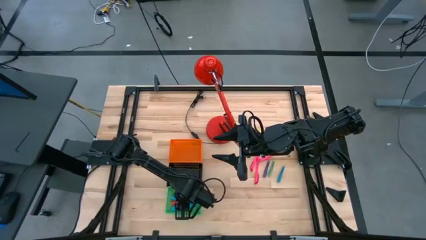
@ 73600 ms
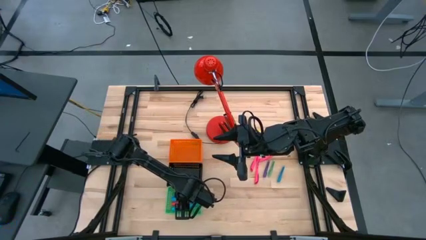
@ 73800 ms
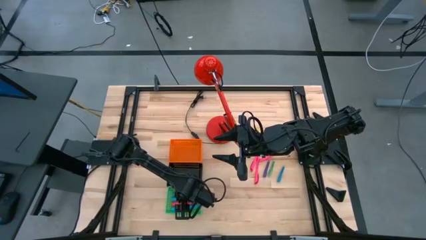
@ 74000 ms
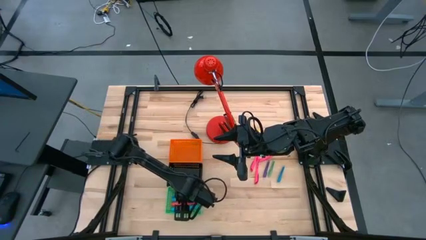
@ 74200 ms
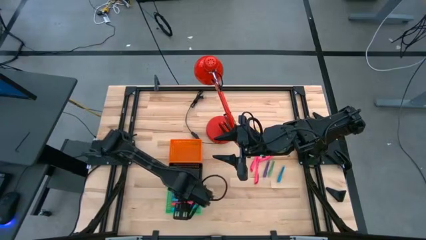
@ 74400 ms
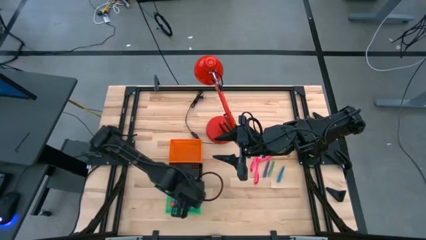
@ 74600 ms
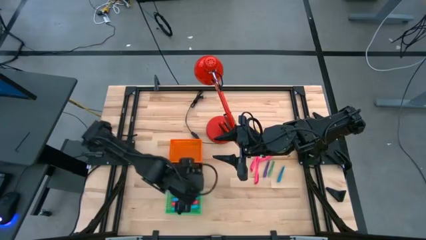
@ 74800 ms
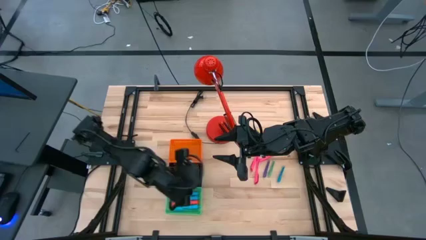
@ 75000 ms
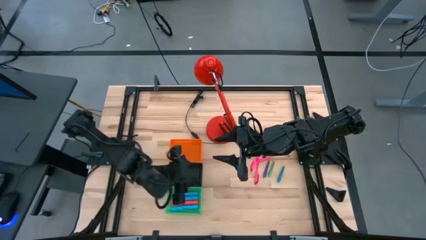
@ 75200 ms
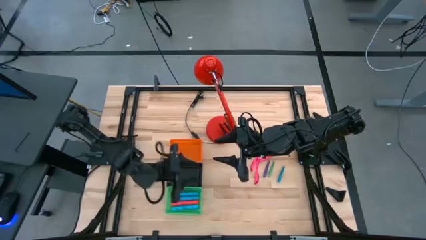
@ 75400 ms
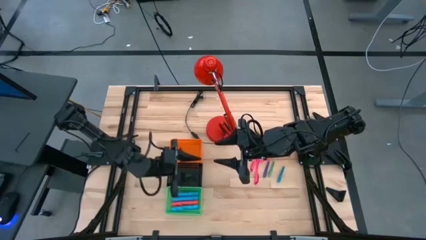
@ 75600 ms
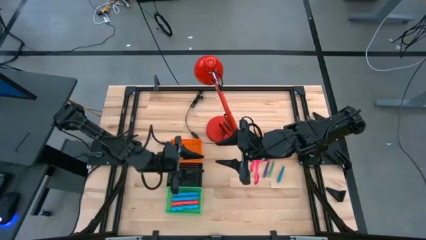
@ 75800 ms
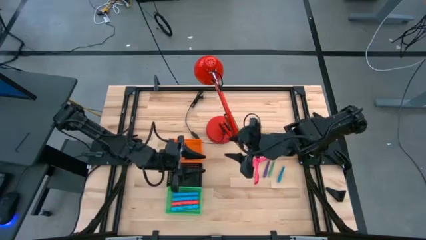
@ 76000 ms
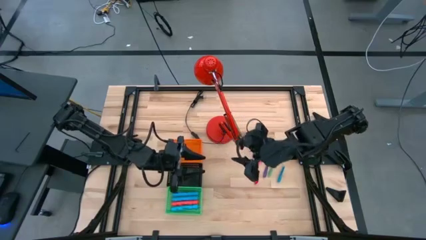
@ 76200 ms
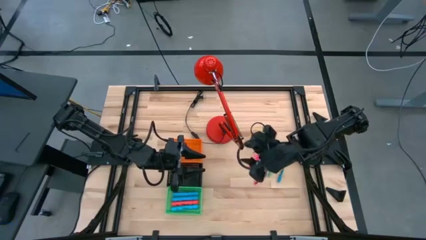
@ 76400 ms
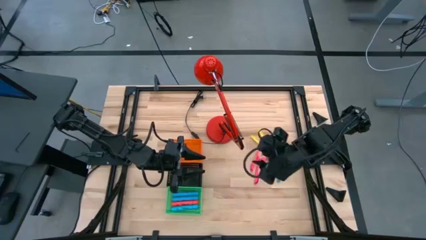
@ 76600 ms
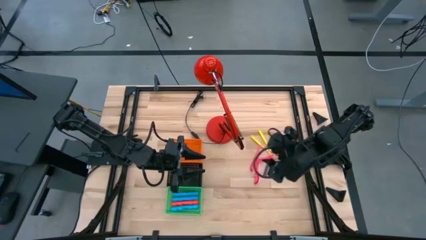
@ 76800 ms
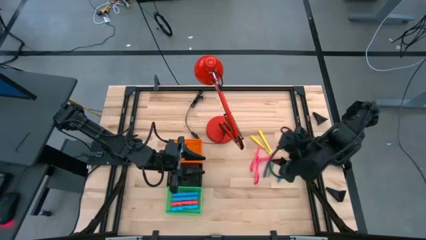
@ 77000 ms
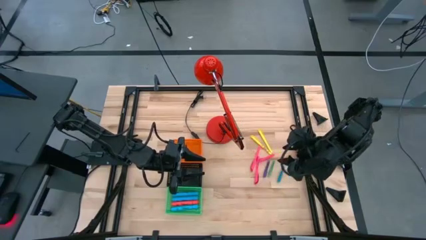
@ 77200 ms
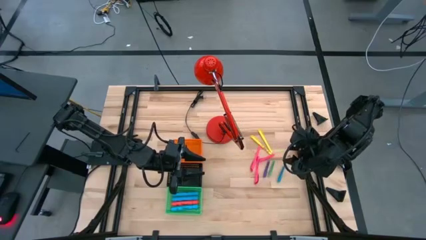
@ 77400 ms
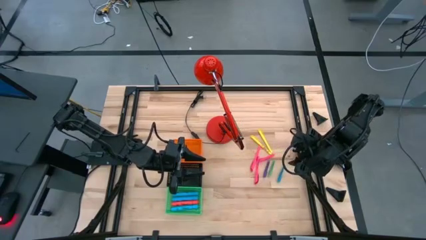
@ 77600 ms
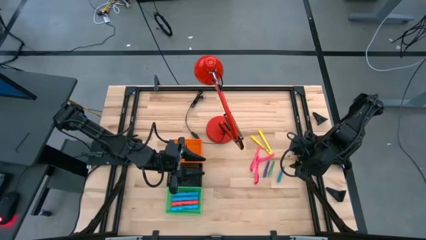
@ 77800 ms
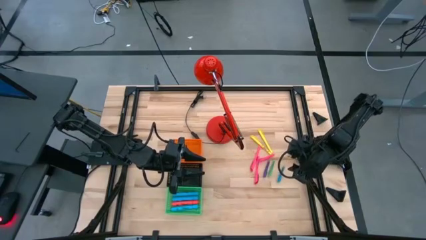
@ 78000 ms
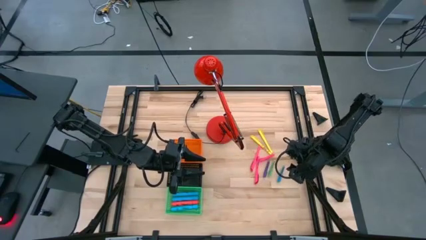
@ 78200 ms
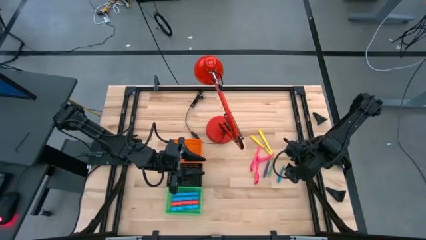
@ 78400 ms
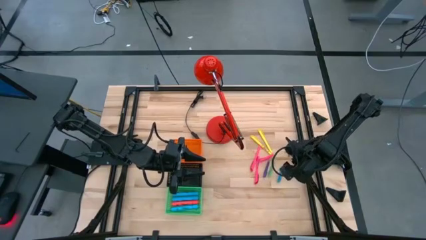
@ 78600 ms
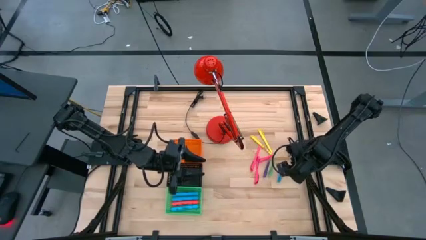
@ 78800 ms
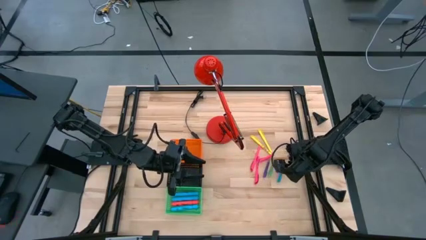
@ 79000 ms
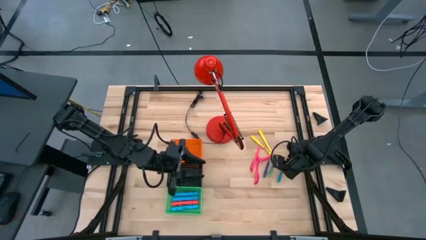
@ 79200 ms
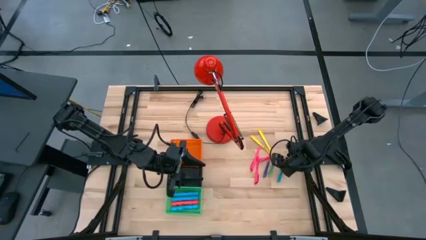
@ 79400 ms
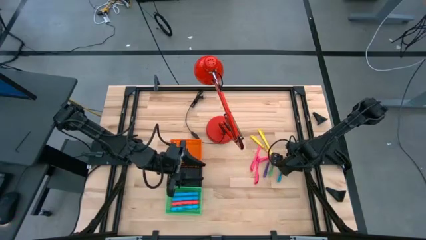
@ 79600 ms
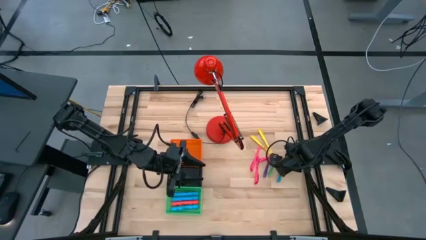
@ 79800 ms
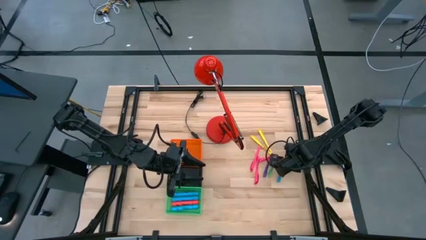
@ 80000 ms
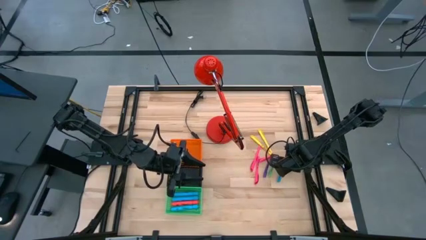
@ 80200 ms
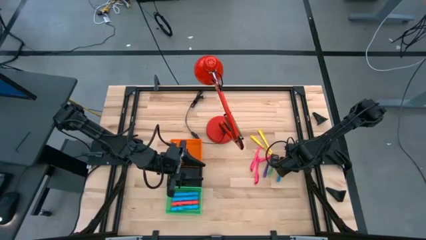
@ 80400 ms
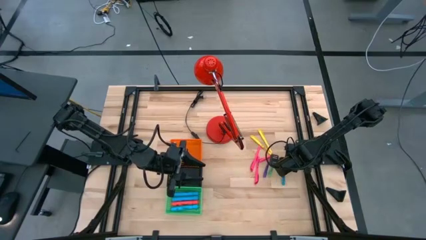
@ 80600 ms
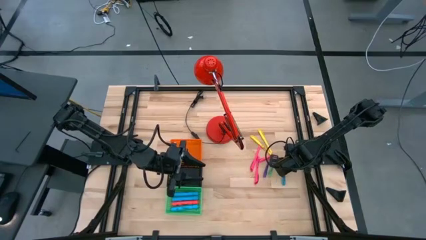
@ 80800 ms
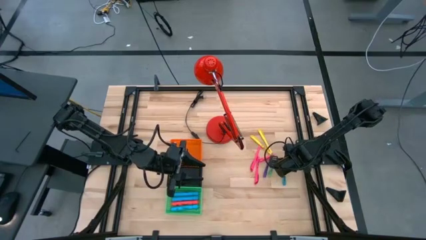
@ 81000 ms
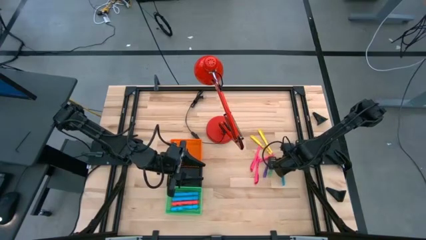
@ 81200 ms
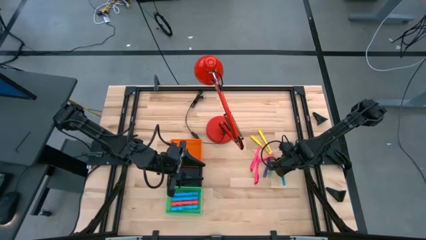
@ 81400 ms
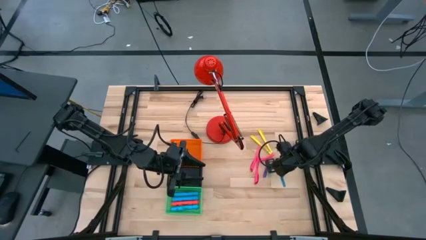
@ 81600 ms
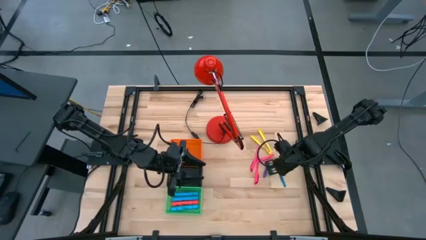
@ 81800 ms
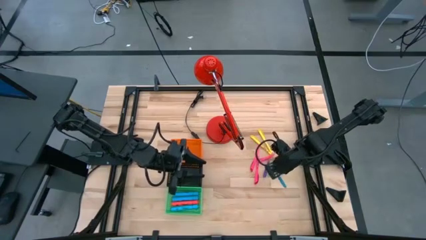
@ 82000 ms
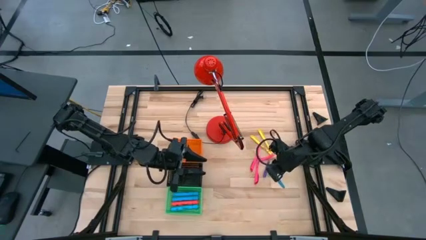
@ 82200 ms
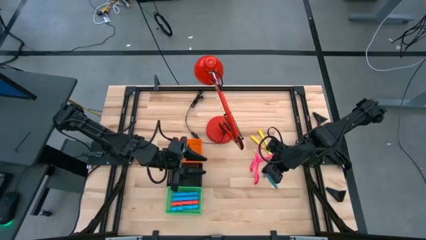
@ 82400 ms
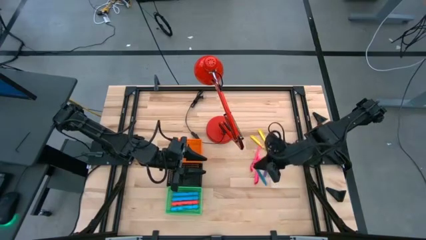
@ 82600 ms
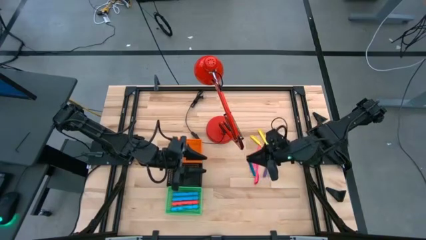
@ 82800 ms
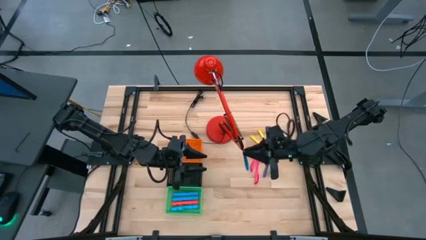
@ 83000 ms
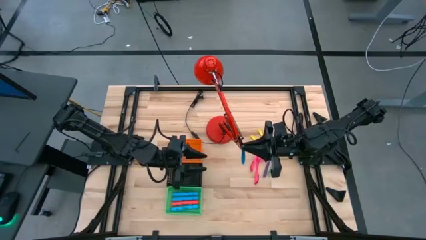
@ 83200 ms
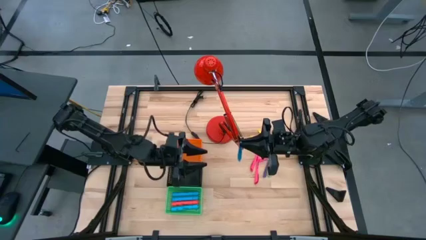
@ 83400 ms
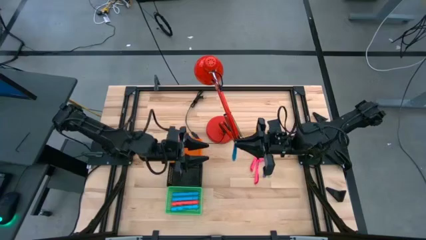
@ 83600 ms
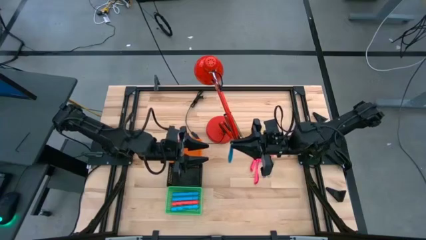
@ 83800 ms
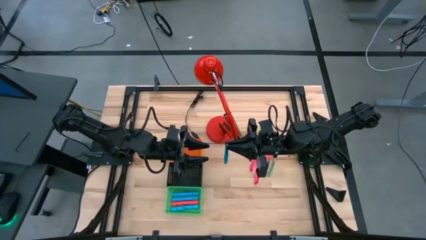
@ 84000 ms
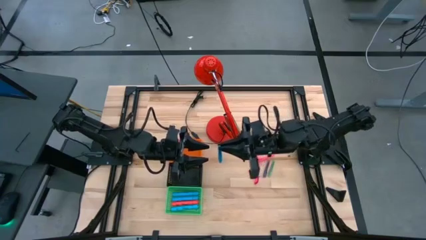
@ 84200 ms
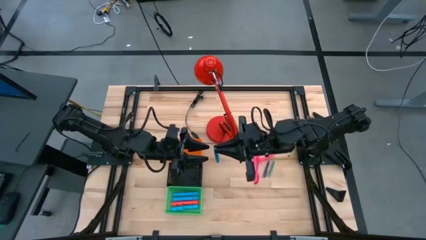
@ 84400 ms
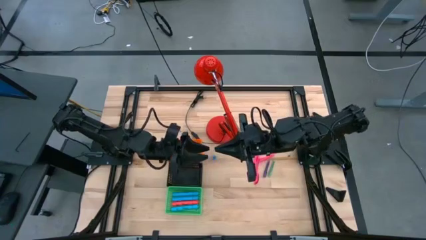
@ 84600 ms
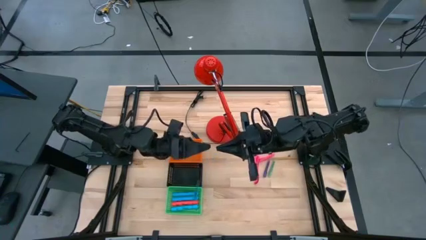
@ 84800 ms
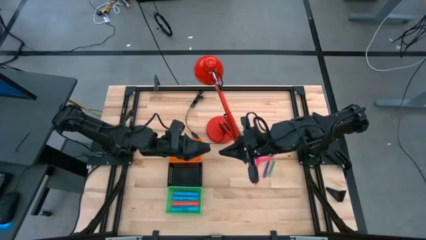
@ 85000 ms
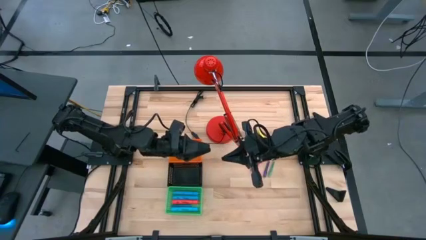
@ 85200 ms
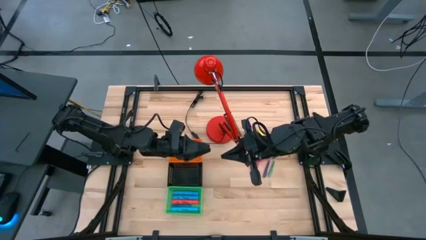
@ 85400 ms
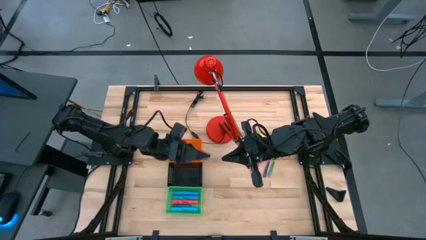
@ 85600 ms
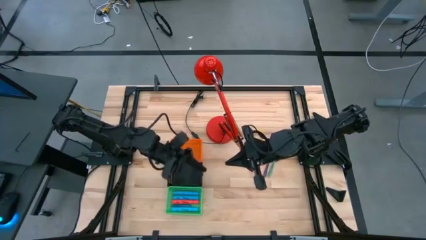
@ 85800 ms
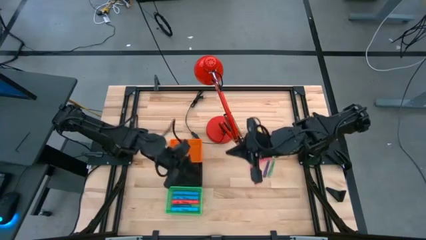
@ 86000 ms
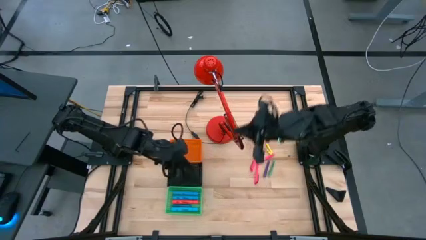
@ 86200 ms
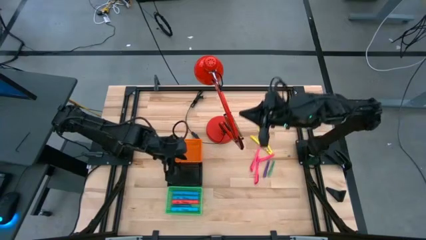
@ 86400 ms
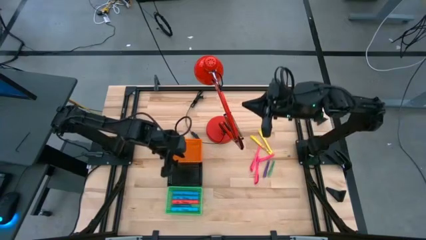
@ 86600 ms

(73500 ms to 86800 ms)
Task: Pick & Place Markers
Put the blue pen into the black bin
